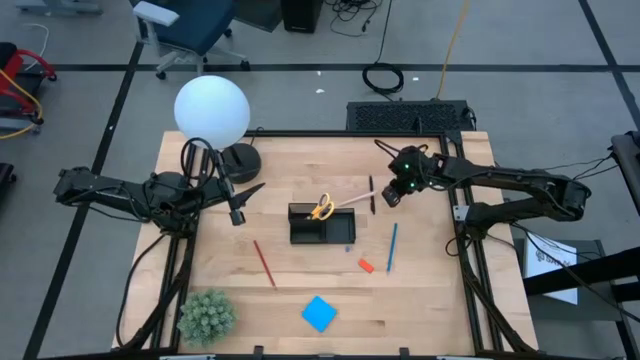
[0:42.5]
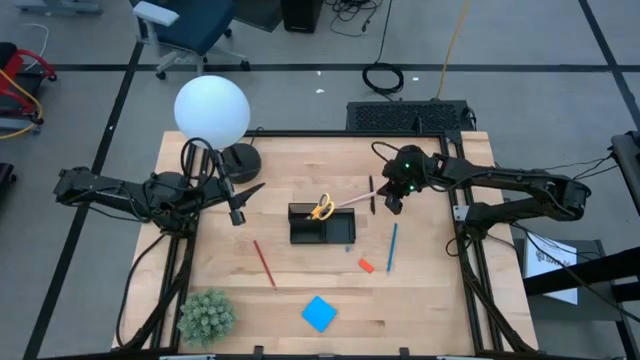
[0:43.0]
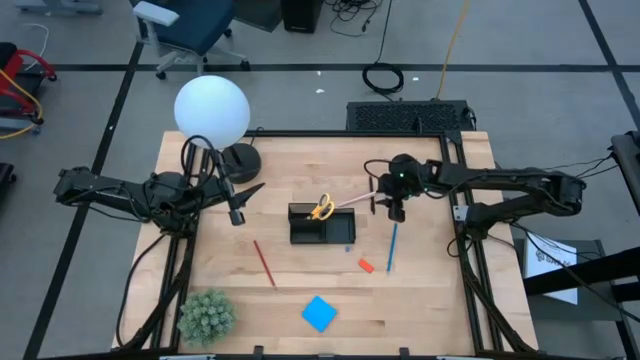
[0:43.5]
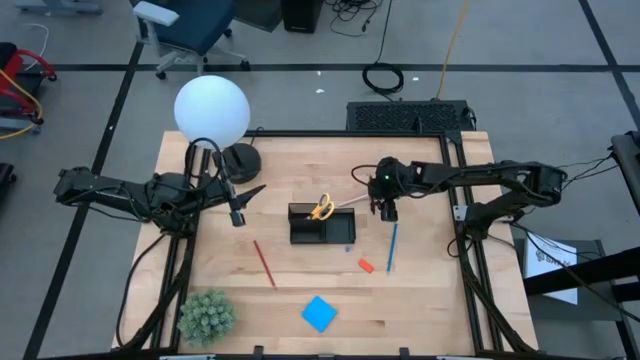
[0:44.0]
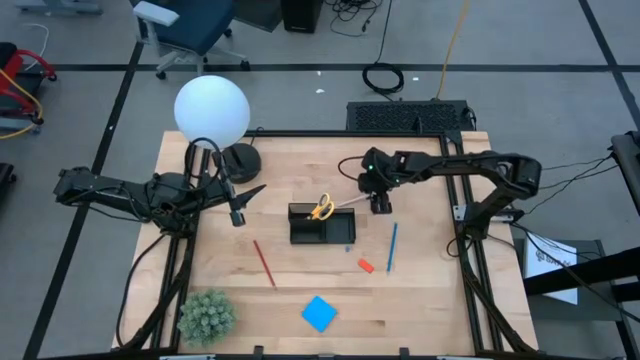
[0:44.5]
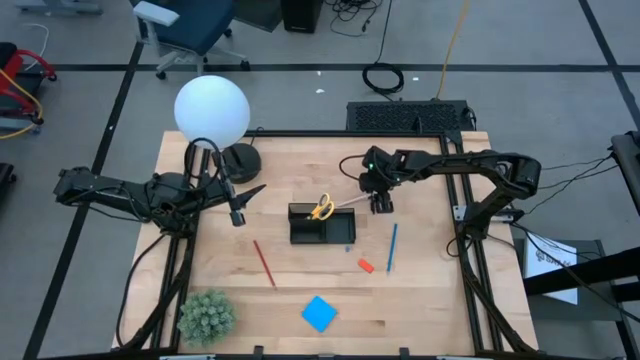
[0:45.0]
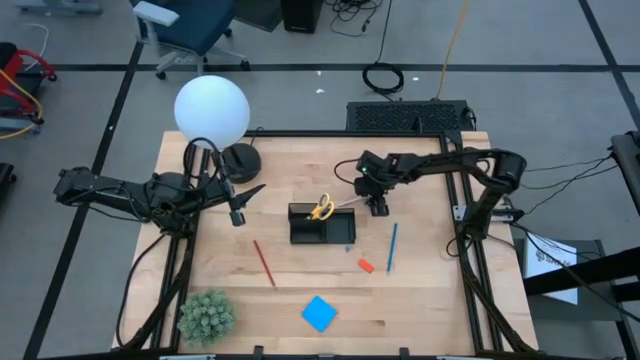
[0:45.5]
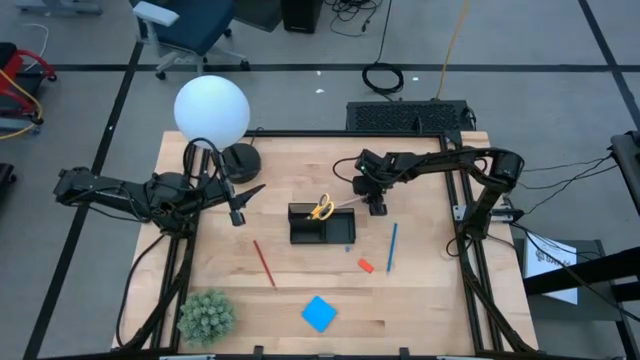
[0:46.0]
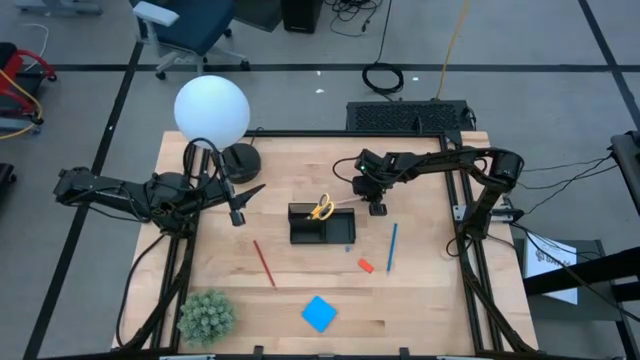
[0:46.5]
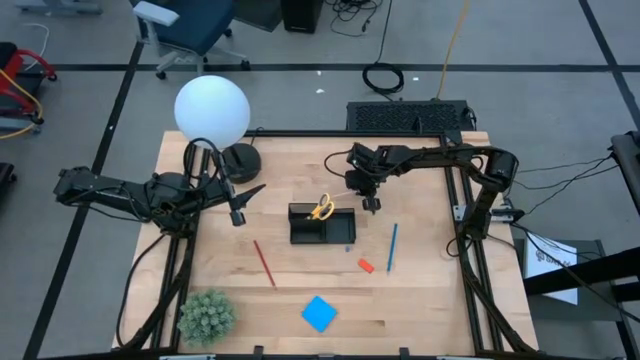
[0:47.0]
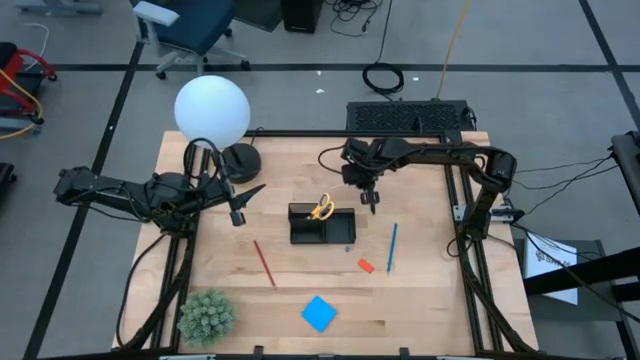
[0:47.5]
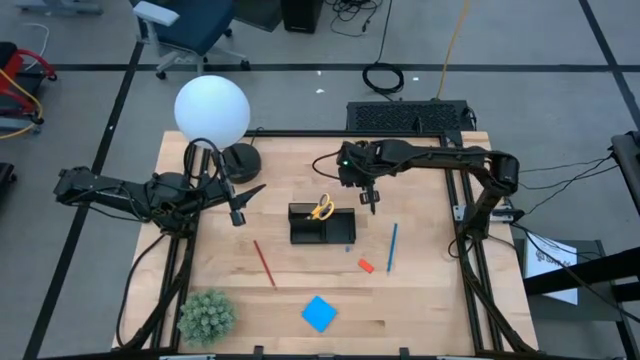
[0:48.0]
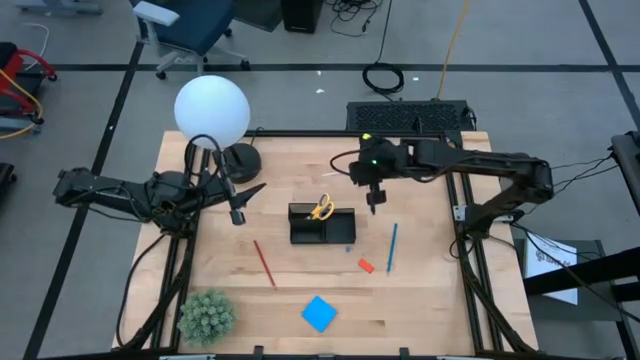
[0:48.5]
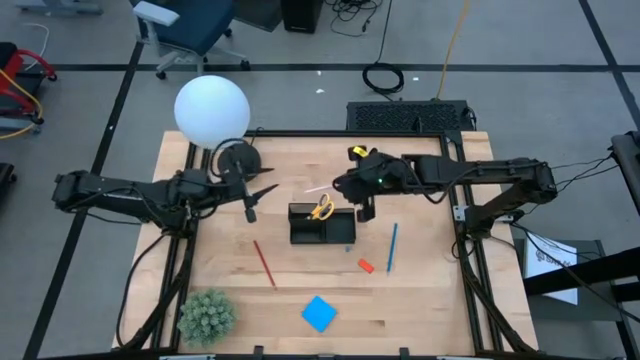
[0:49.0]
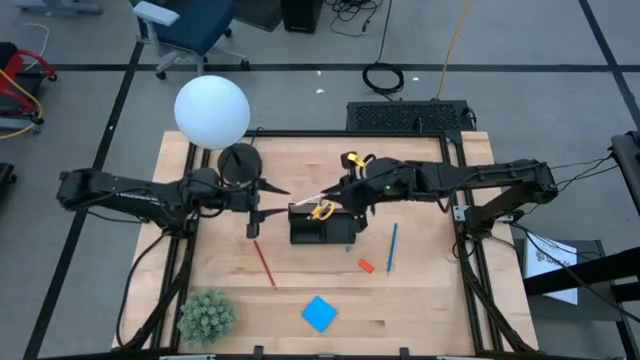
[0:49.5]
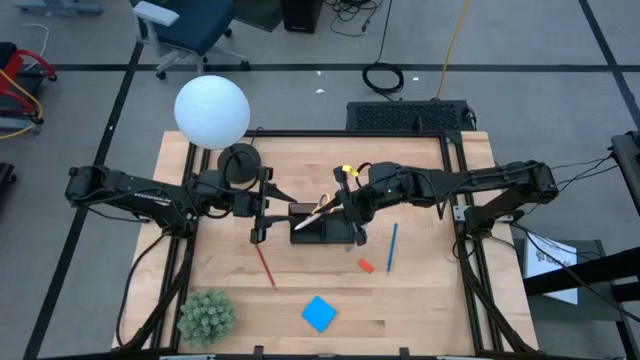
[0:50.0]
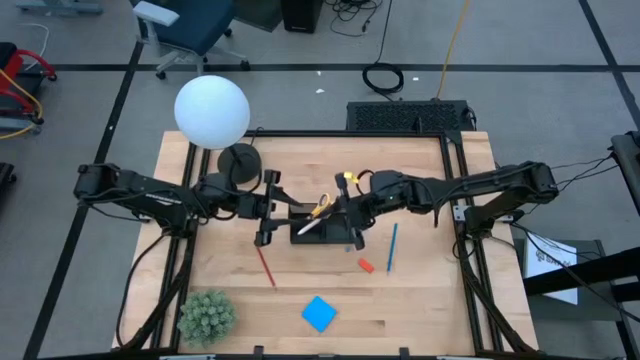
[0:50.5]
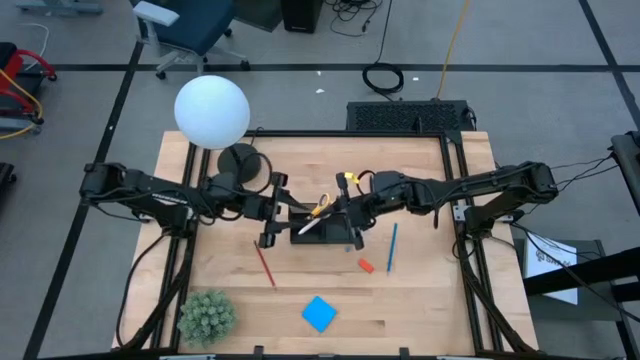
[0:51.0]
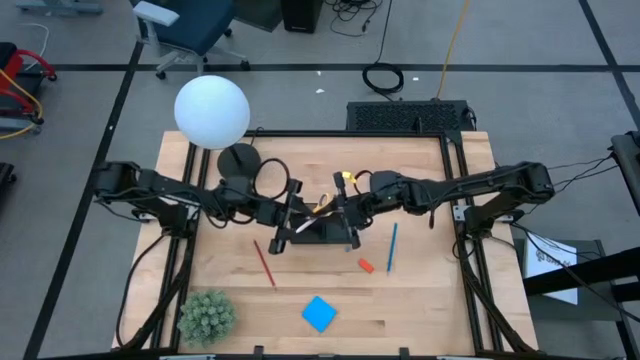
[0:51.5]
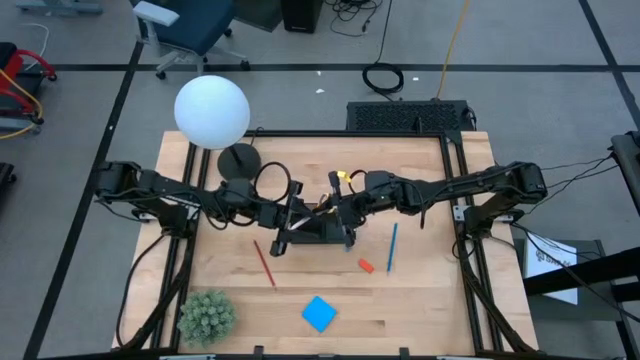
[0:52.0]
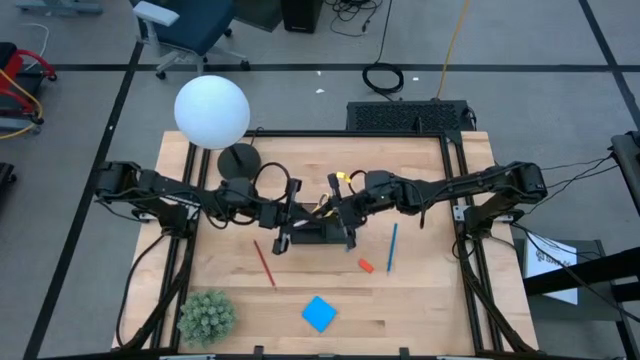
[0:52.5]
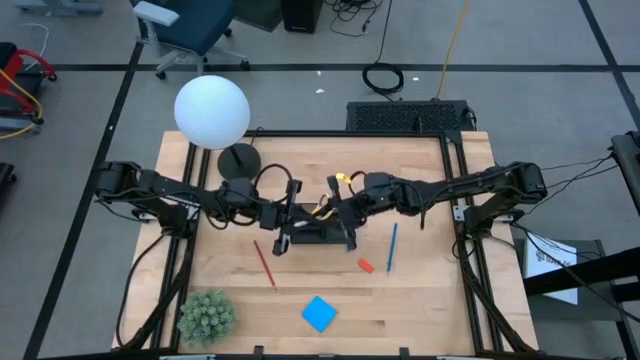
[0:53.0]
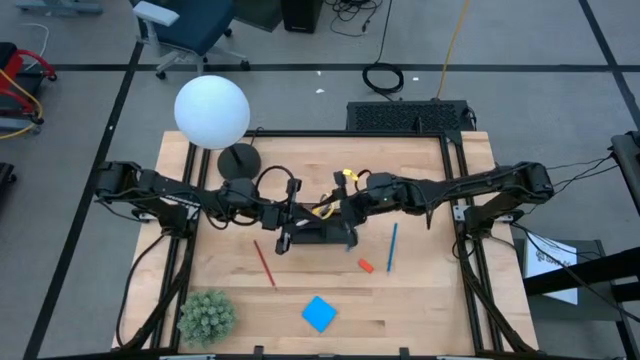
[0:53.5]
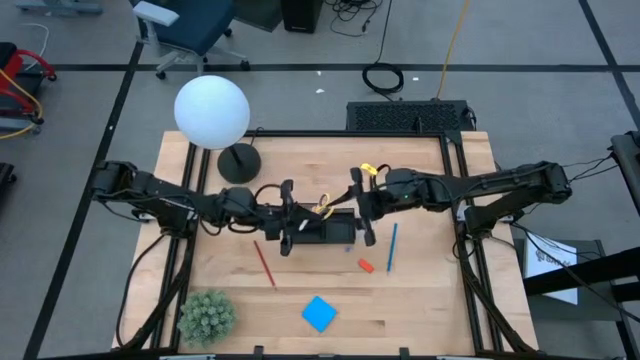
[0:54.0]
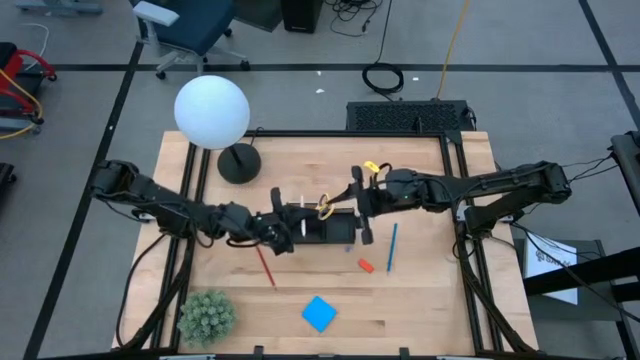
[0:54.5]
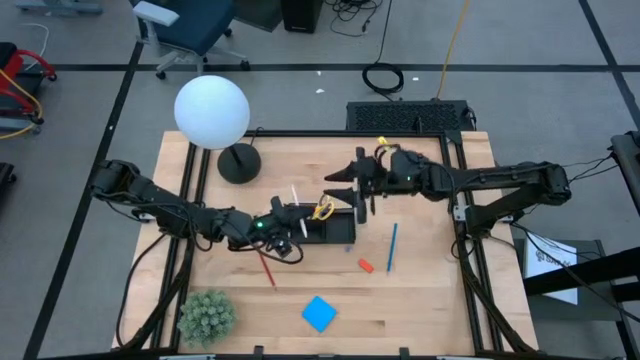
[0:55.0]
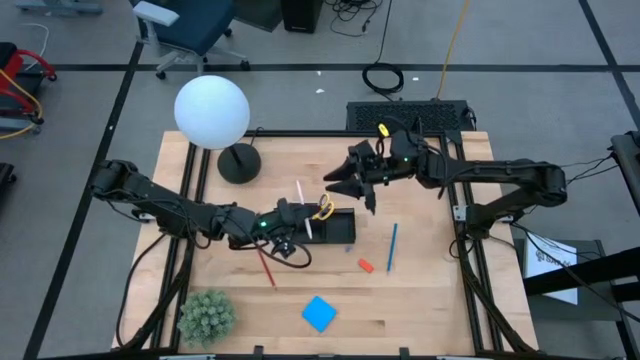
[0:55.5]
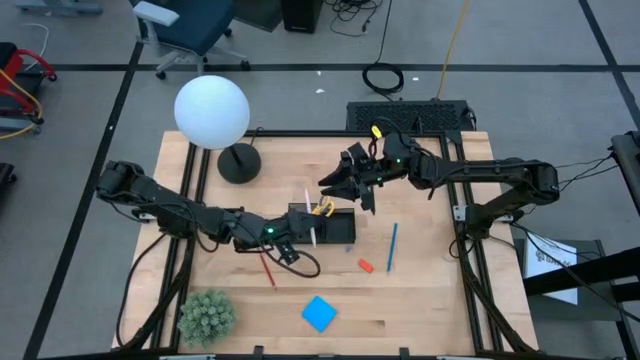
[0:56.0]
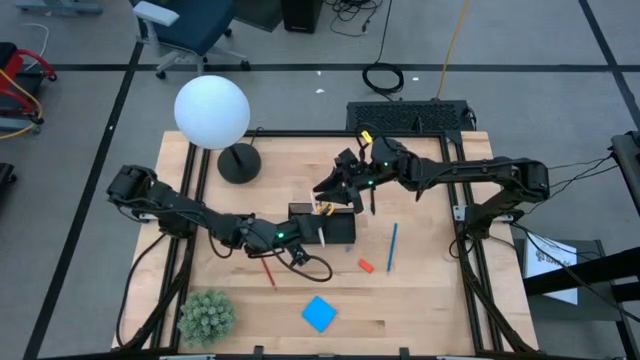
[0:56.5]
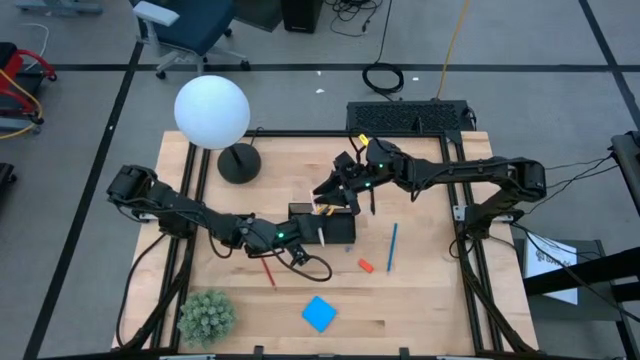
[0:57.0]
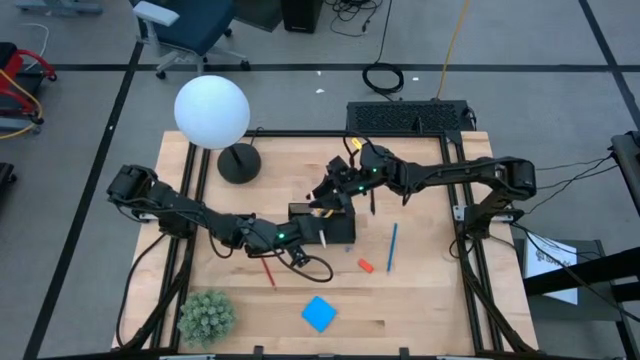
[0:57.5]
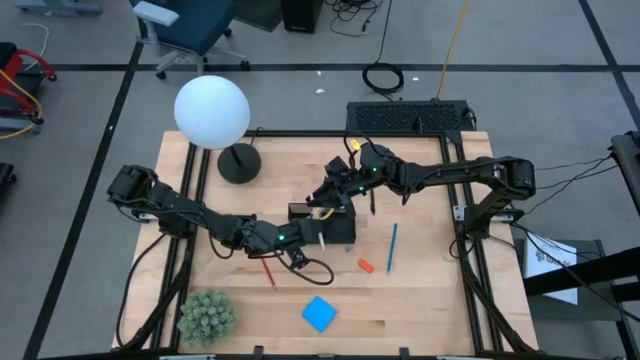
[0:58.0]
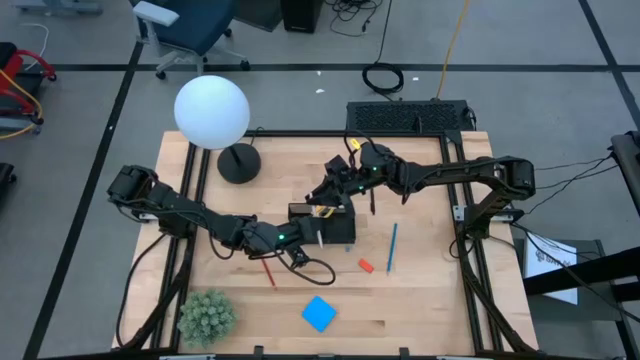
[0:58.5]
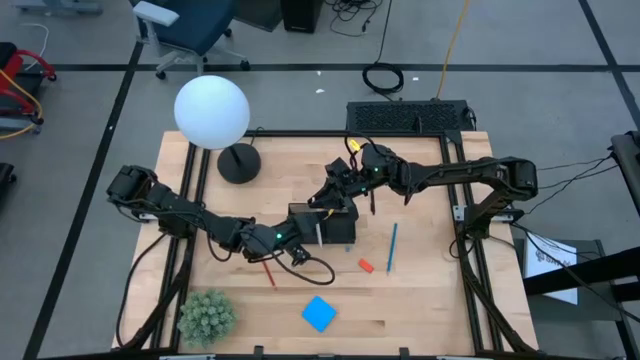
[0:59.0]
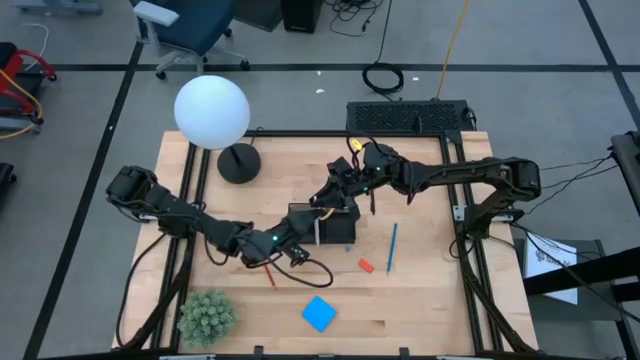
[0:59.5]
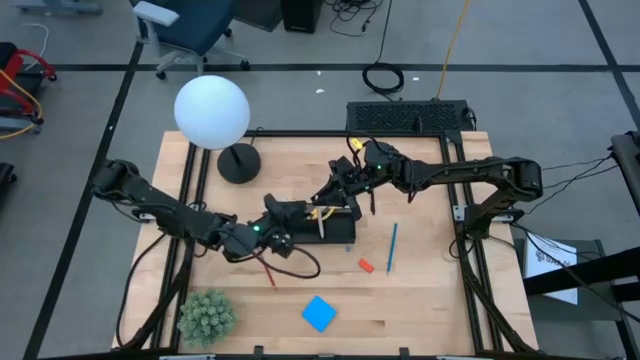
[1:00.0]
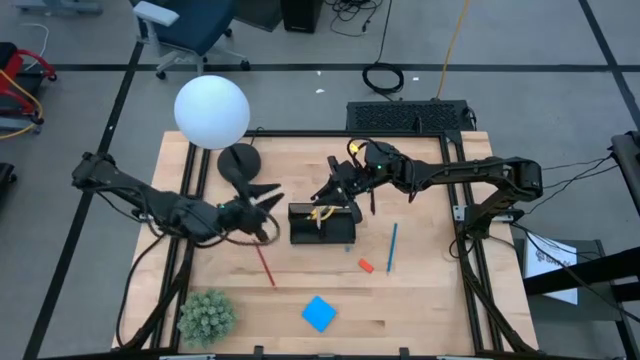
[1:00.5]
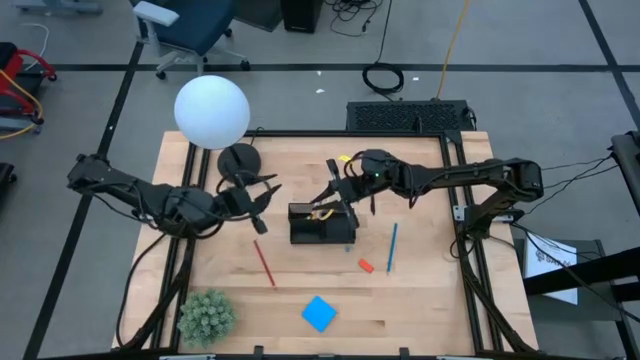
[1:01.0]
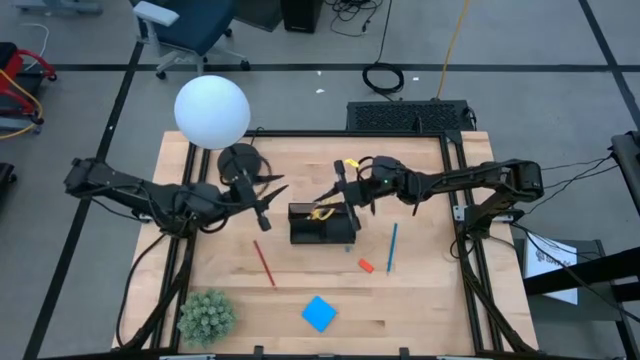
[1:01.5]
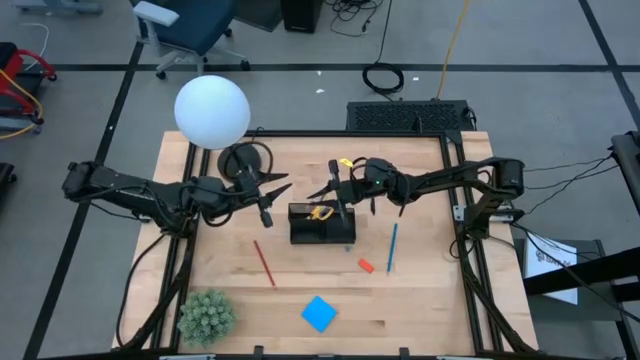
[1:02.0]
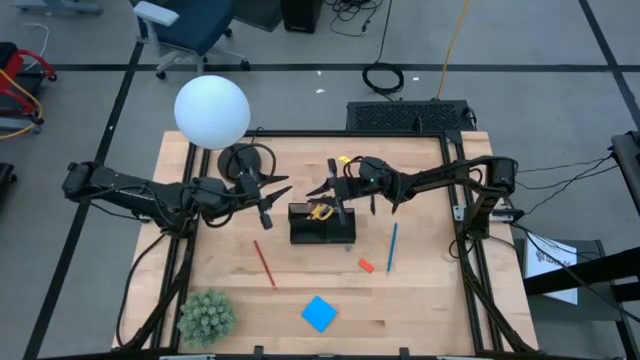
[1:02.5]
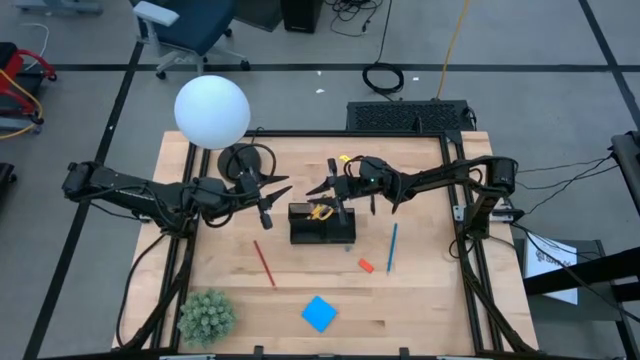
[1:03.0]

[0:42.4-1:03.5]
Task: Pick and place office supplies into organizer
Put the light pink pen into the desk organizer
